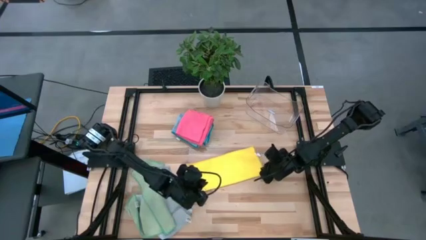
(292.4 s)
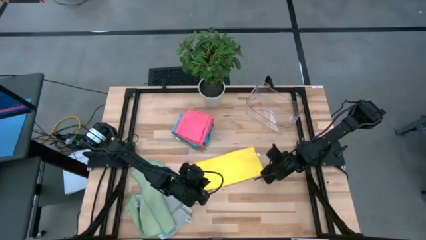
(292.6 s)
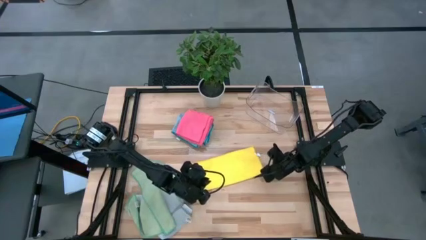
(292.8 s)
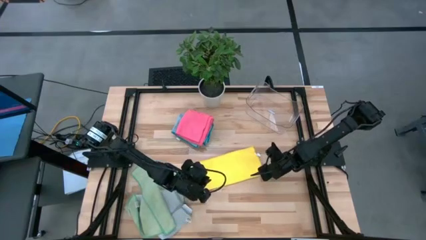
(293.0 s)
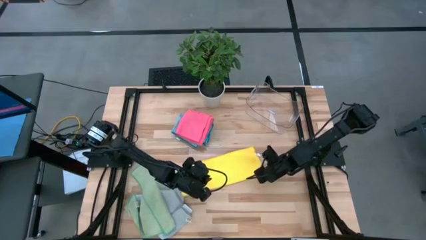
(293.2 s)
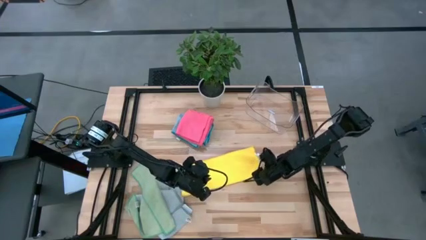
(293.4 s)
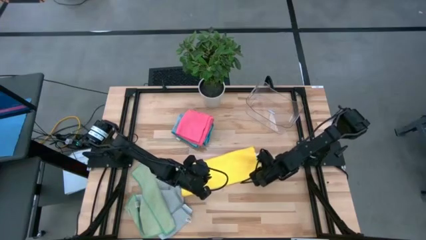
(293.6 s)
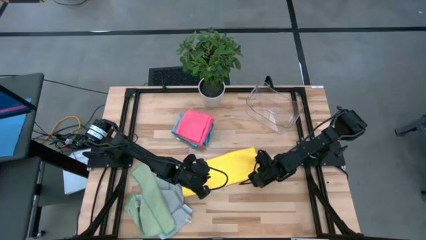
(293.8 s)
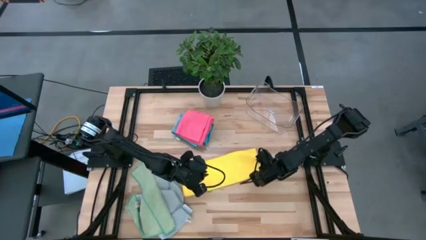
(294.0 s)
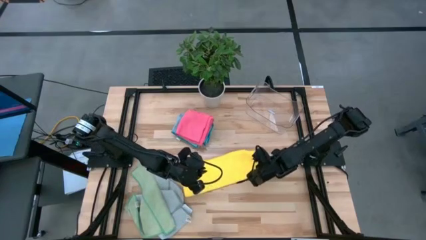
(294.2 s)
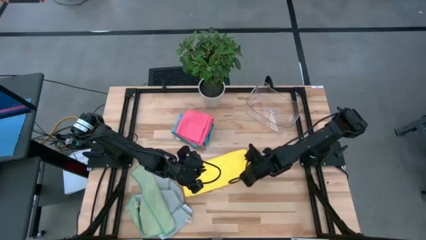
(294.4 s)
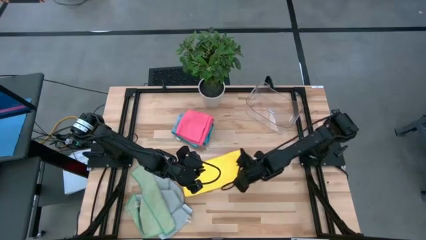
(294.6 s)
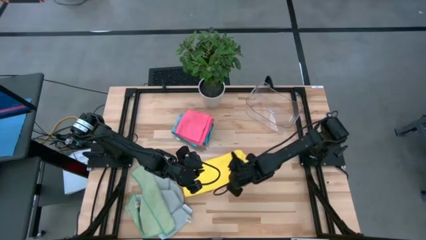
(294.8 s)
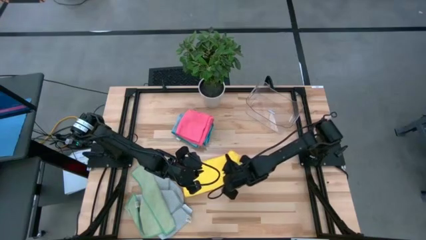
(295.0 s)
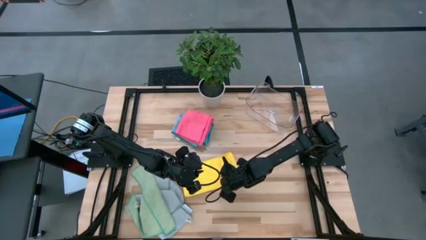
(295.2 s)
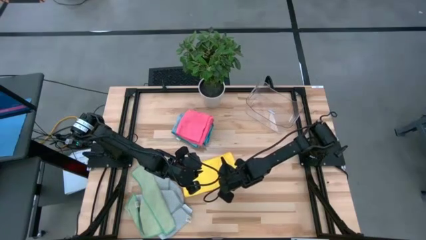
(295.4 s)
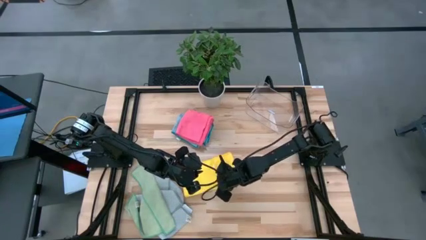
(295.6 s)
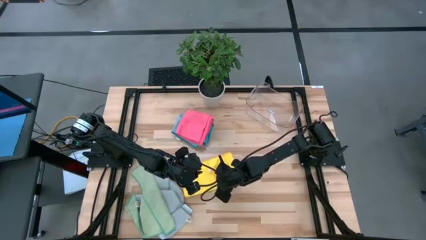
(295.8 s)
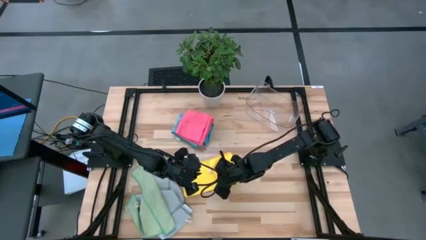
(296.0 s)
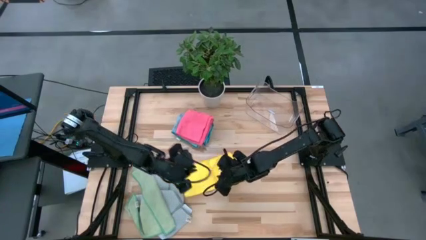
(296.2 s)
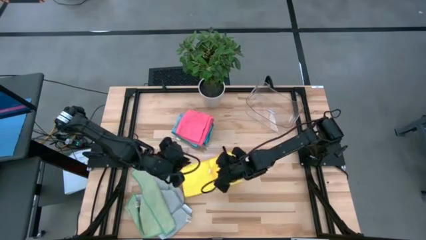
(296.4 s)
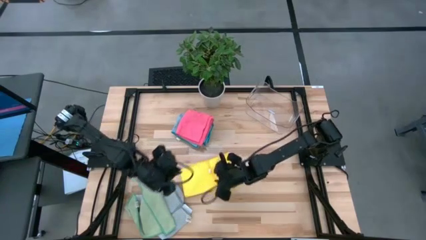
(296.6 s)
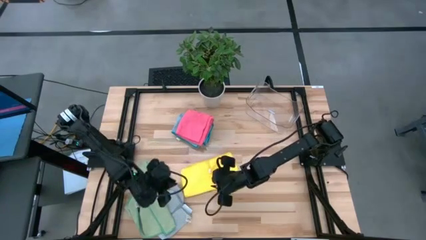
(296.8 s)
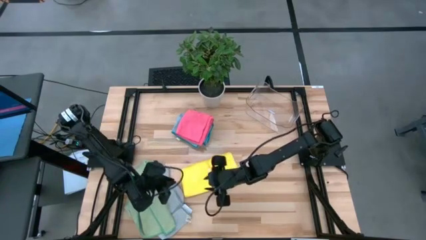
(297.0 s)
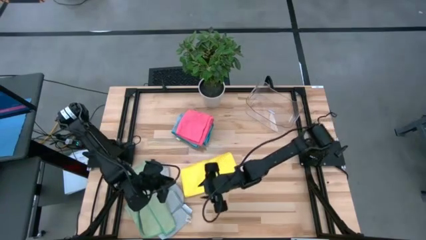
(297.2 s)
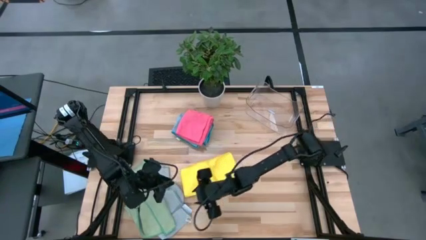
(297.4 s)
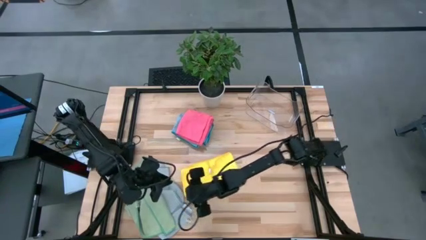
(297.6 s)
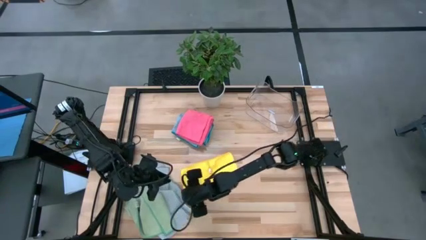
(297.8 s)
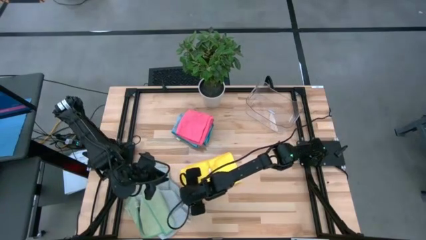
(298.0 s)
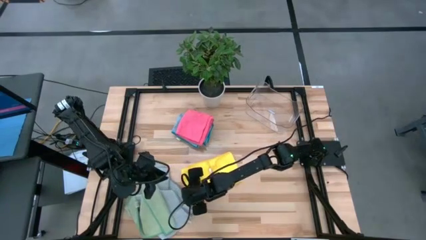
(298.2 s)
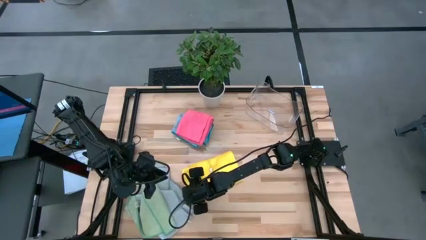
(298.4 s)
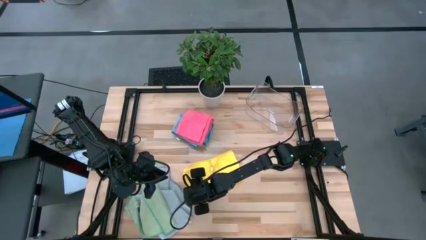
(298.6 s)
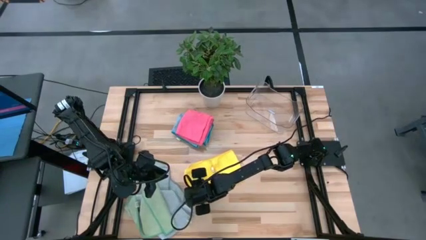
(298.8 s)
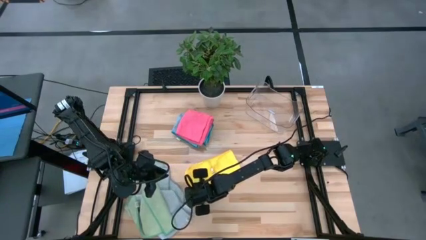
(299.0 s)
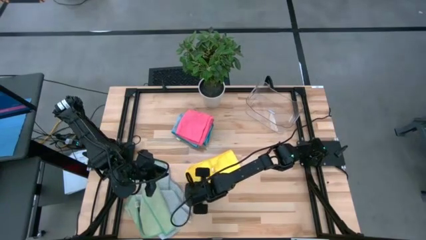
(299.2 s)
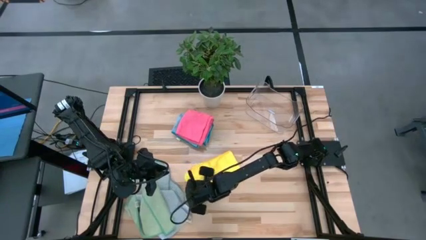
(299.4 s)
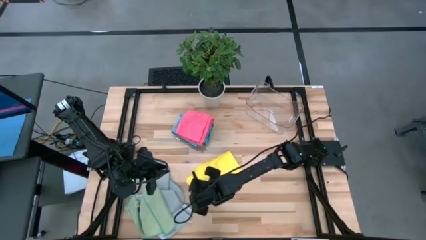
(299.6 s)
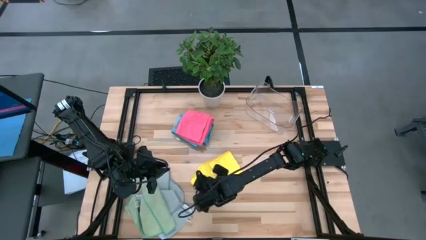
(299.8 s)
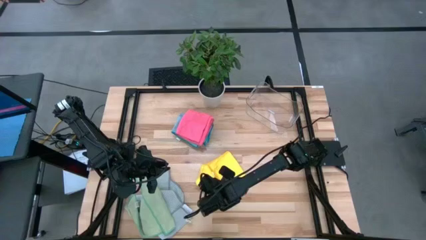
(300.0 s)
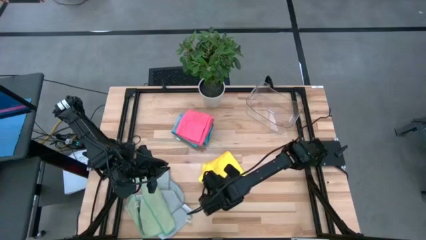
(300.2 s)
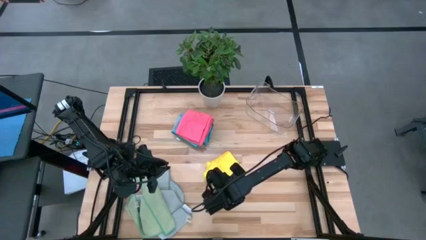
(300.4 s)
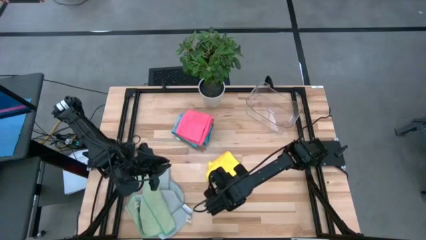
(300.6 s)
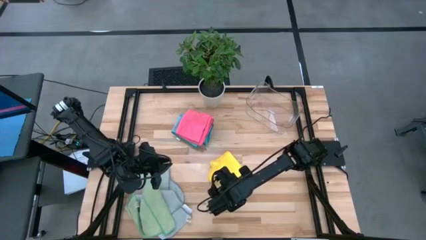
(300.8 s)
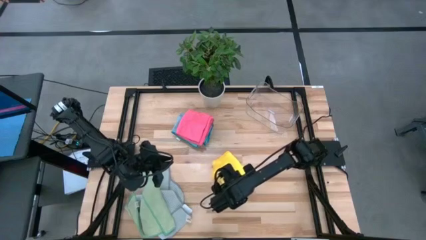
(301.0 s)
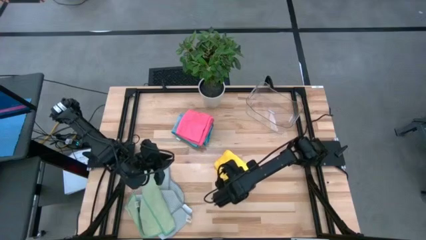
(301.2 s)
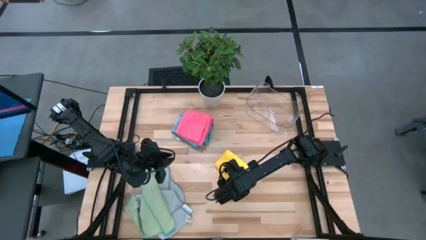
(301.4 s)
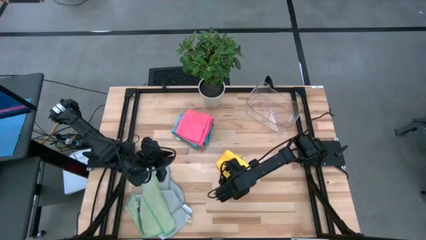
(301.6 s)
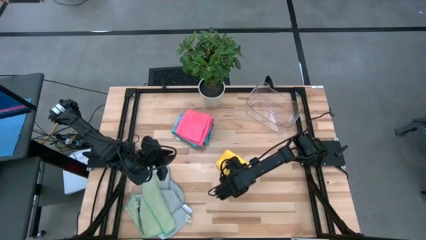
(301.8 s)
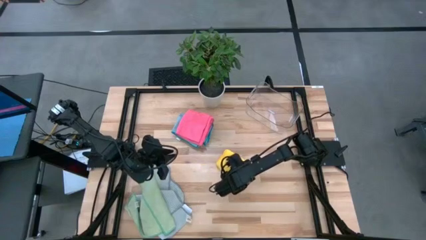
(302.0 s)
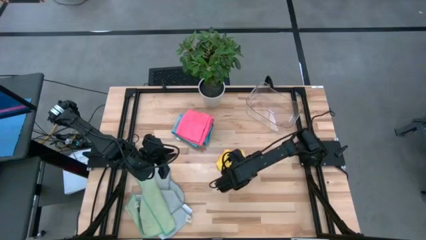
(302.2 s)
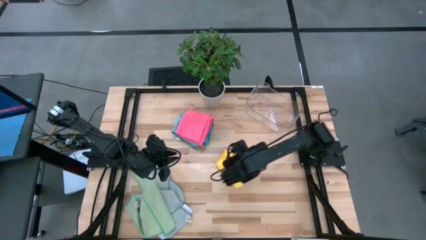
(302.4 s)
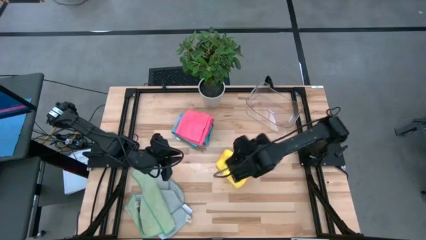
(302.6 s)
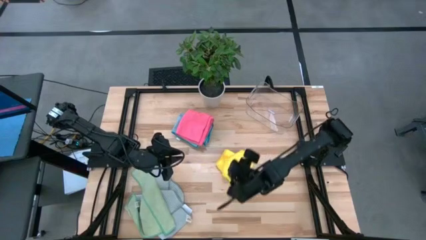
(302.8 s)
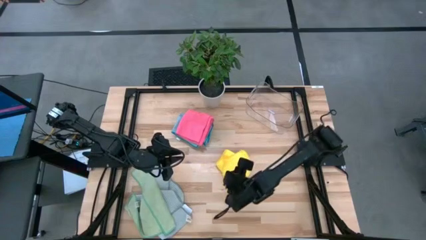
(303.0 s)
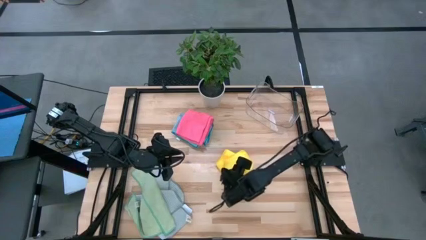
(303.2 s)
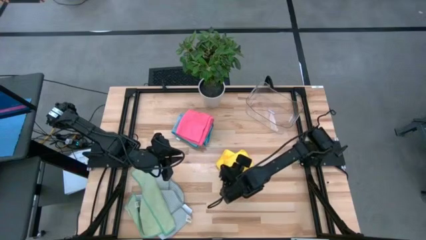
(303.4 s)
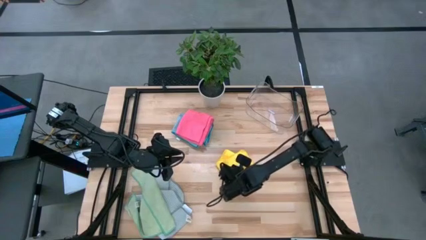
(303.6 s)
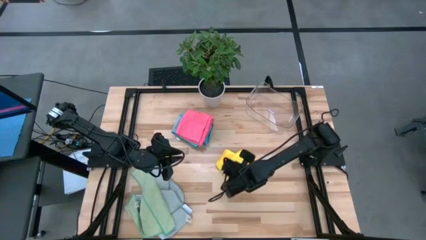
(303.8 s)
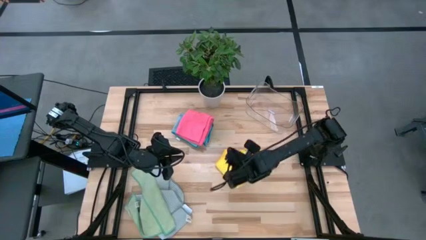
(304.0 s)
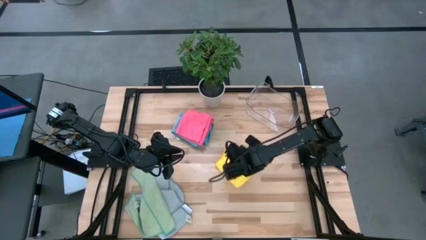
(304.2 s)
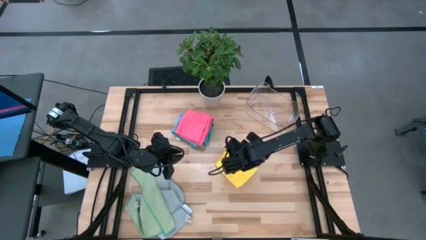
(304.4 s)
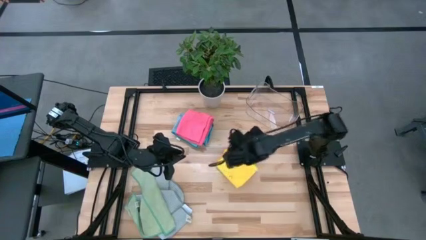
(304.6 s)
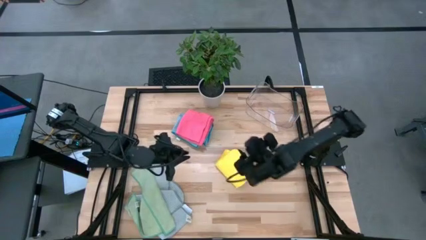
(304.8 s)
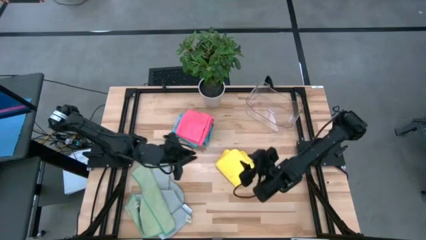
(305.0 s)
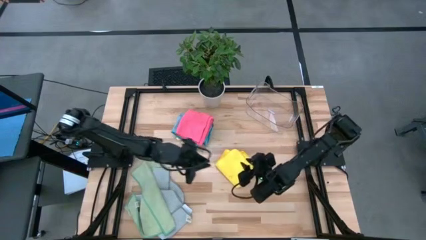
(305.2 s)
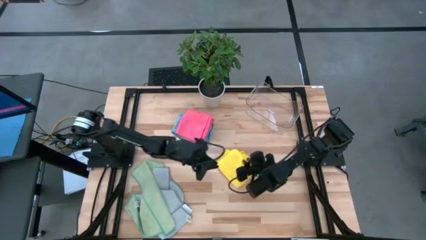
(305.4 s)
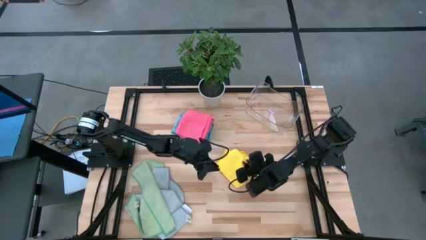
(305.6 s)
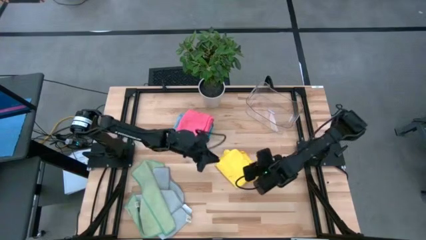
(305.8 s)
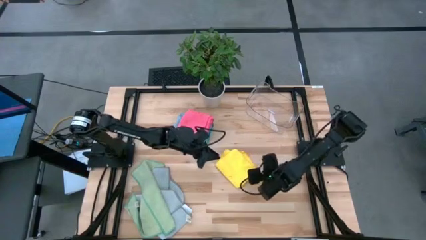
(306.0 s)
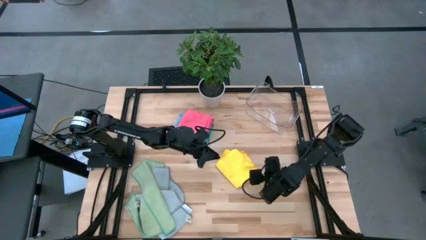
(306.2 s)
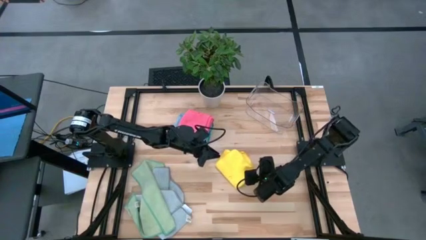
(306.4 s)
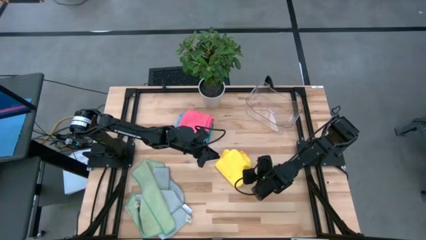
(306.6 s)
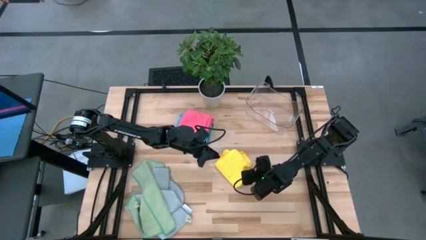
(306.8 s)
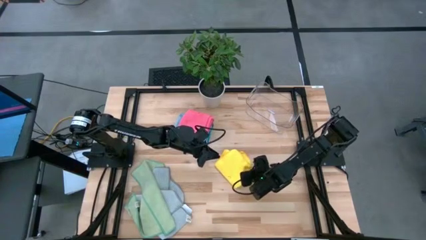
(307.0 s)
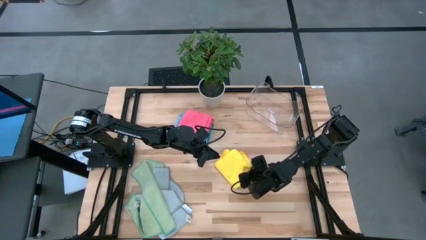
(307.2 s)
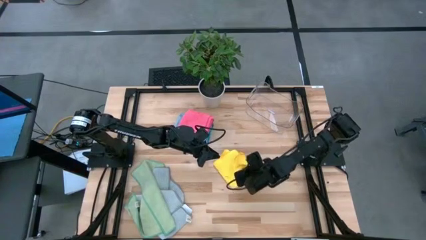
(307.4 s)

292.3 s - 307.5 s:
Task: Fold microfiber towels
Fold the yellow microfiber towel

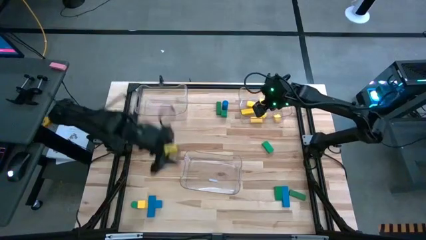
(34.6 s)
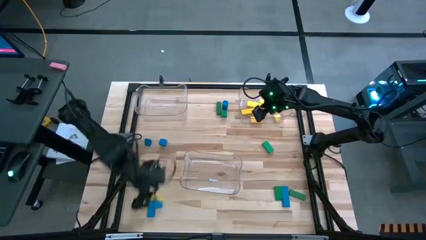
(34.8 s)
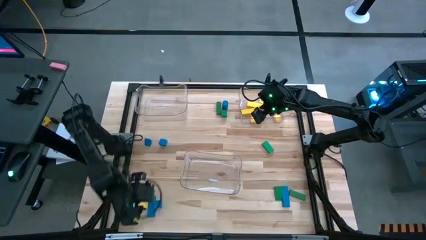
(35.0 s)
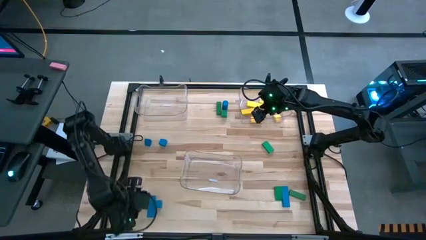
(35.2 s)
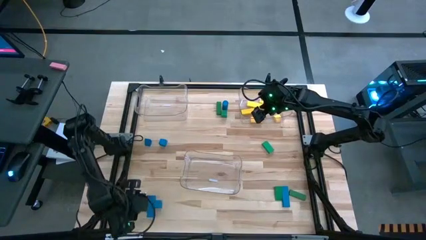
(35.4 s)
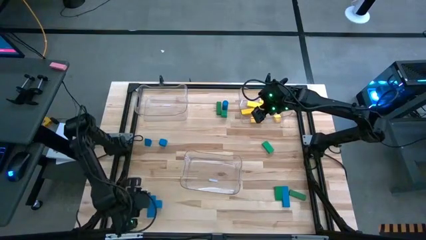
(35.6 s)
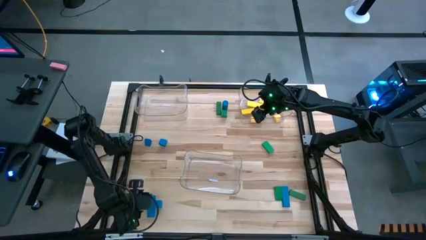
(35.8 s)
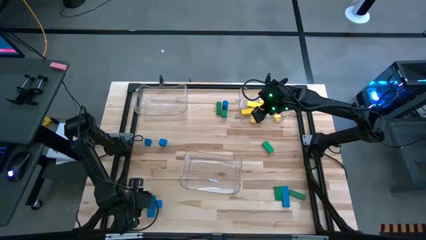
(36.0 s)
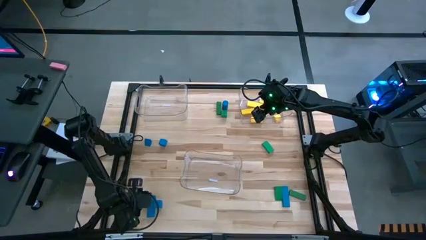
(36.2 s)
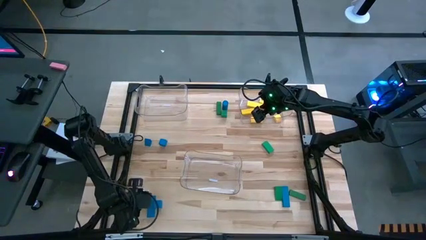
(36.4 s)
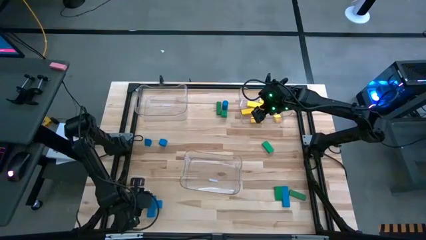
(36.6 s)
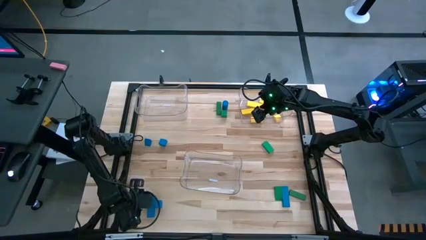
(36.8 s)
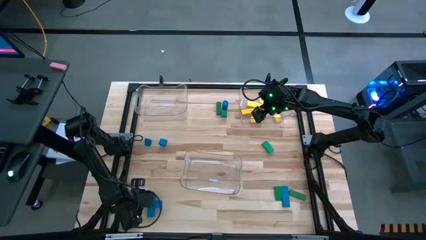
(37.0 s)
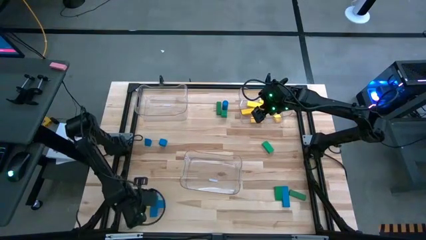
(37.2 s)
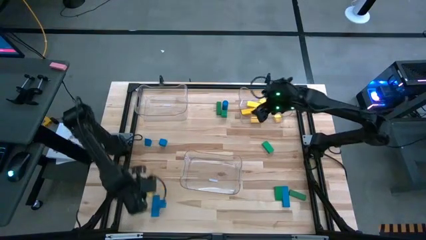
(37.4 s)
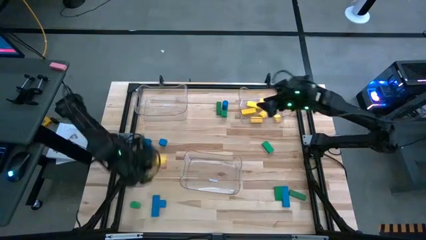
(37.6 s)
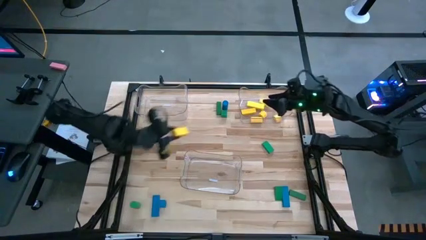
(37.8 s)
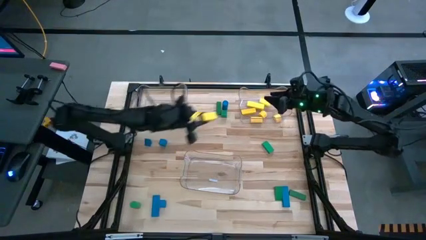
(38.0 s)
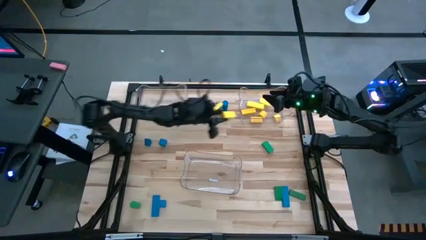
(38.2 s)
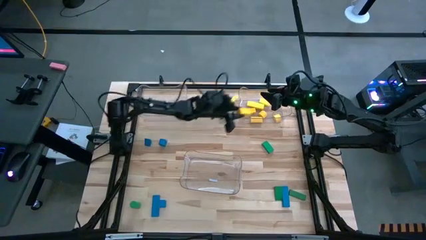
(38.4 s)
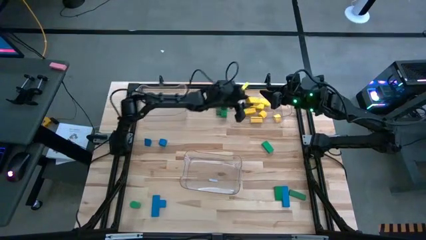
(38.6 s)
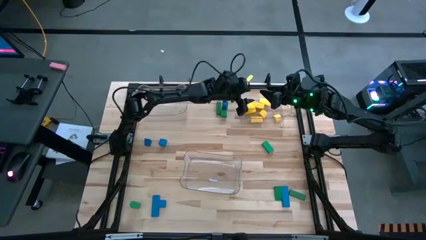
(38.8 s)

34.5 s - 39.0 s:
Task: Sort blocks
Put the yellow block into the right transparent bin
